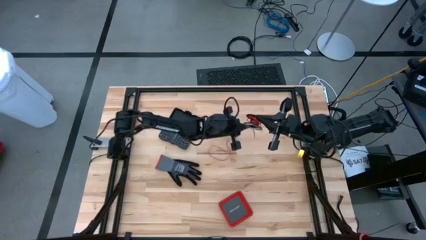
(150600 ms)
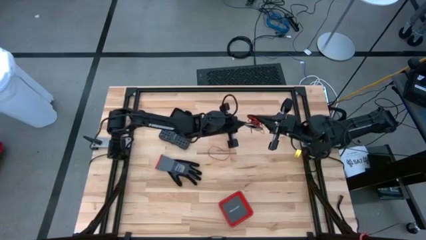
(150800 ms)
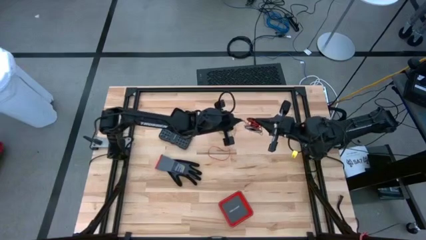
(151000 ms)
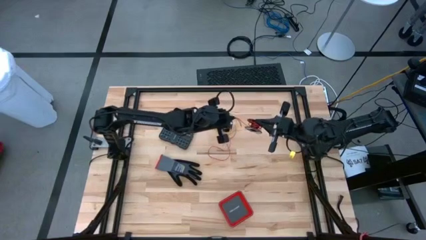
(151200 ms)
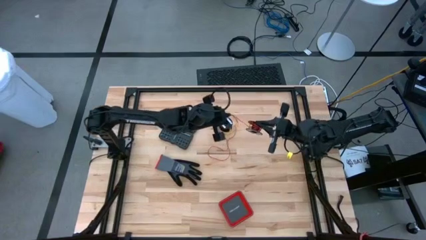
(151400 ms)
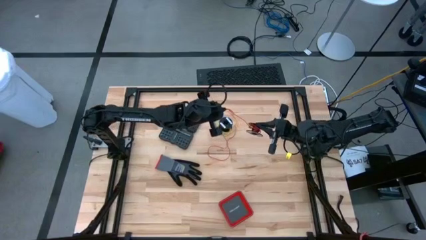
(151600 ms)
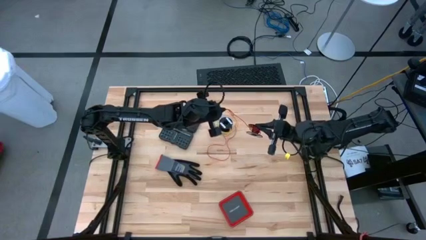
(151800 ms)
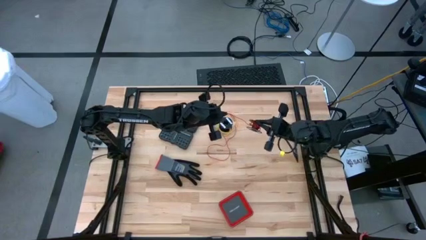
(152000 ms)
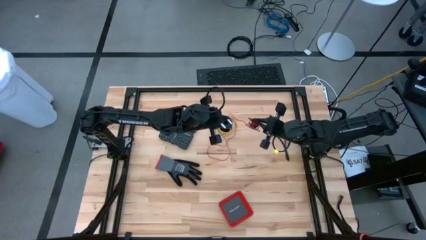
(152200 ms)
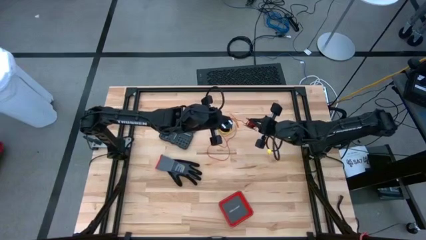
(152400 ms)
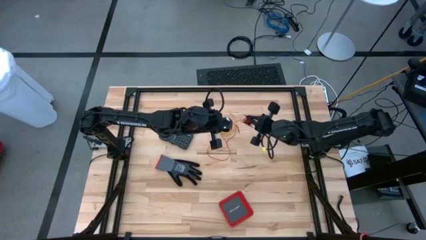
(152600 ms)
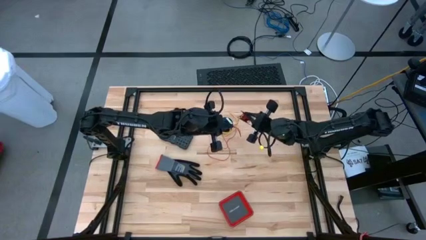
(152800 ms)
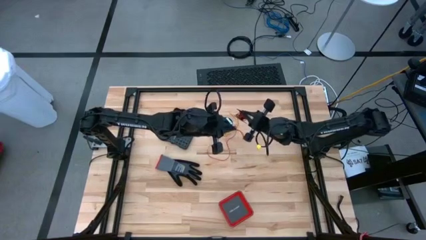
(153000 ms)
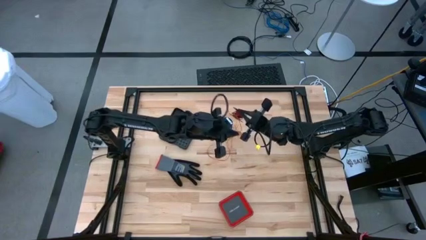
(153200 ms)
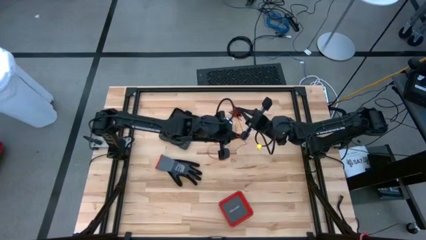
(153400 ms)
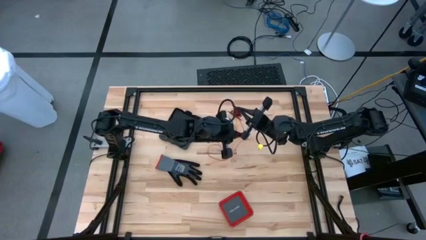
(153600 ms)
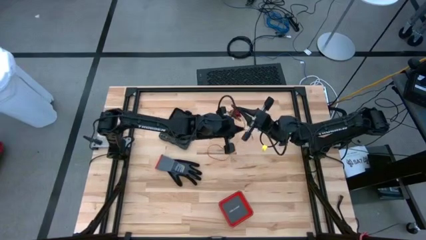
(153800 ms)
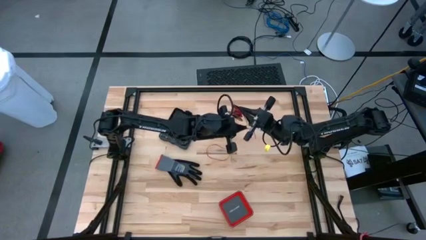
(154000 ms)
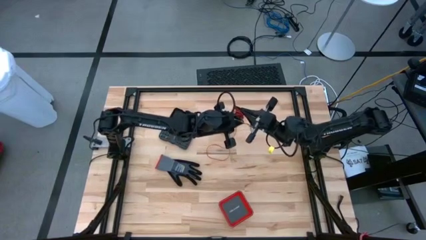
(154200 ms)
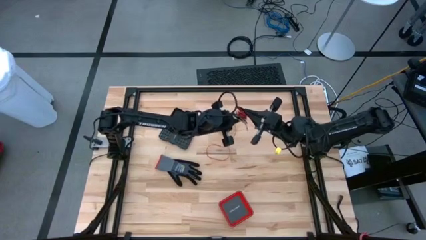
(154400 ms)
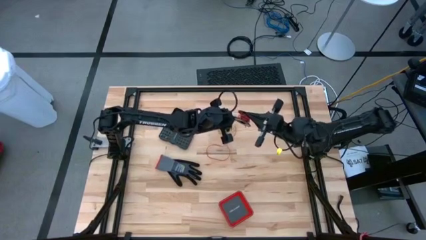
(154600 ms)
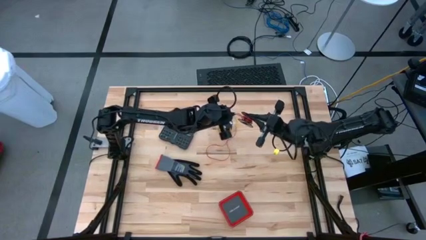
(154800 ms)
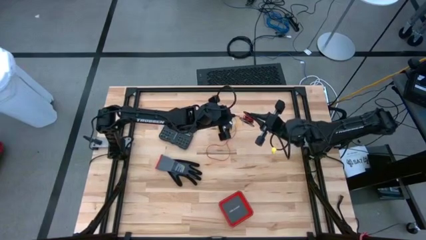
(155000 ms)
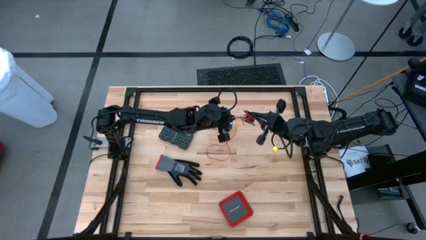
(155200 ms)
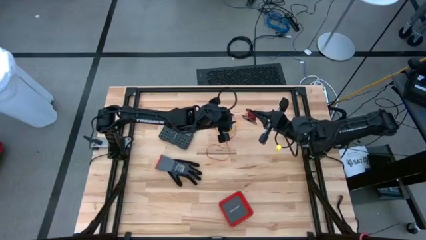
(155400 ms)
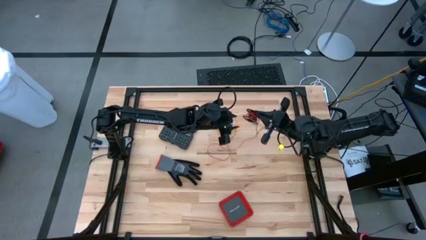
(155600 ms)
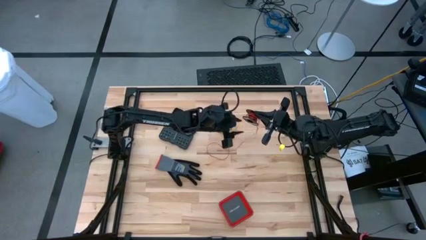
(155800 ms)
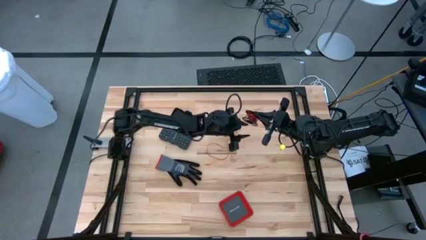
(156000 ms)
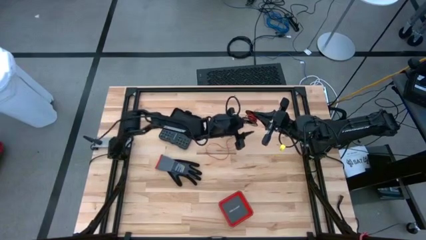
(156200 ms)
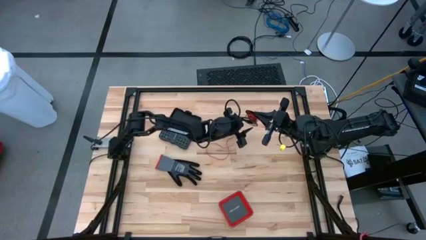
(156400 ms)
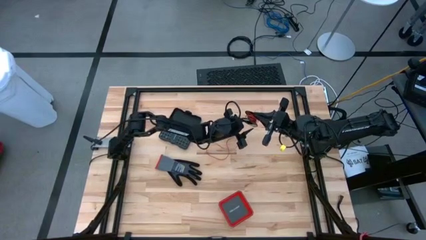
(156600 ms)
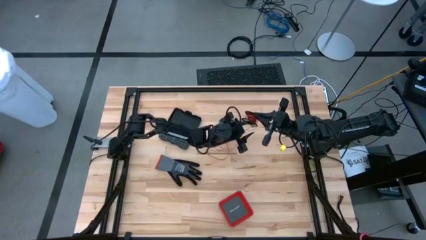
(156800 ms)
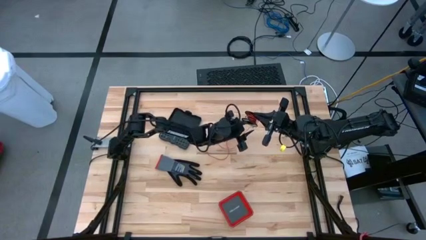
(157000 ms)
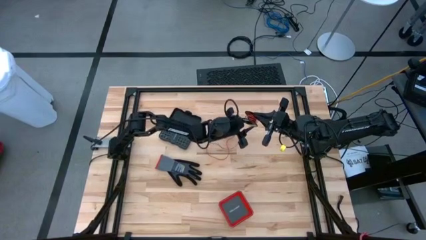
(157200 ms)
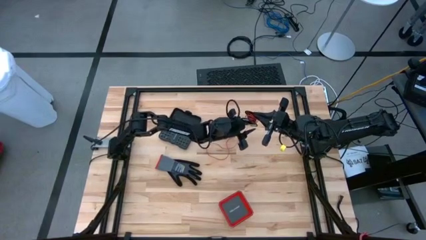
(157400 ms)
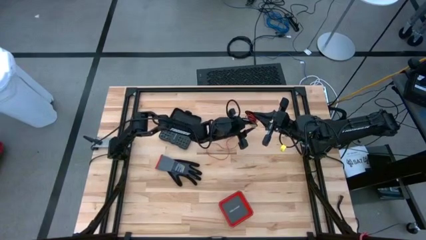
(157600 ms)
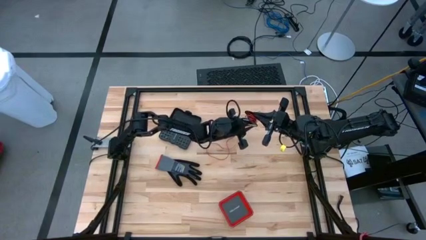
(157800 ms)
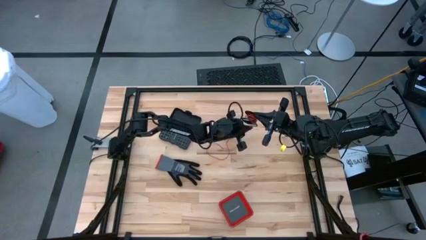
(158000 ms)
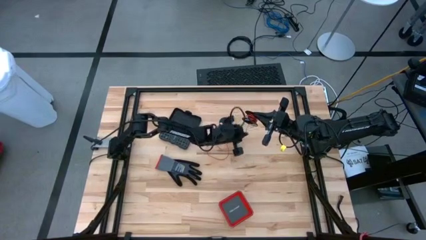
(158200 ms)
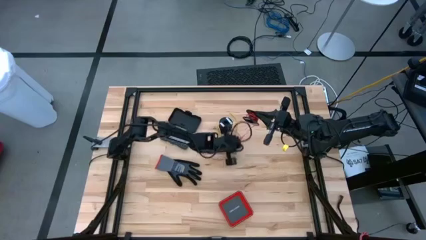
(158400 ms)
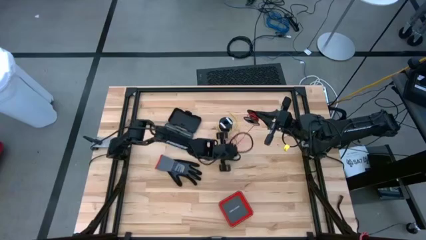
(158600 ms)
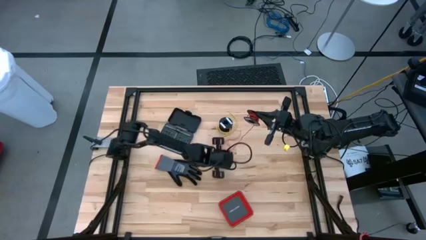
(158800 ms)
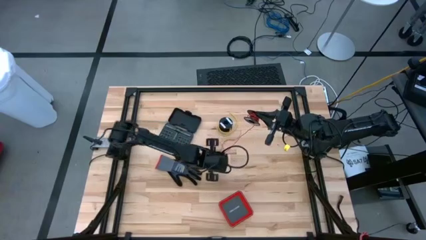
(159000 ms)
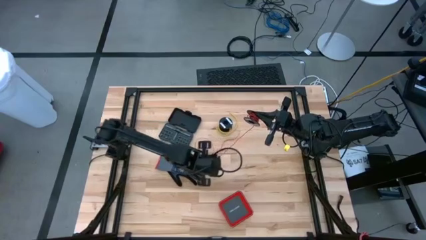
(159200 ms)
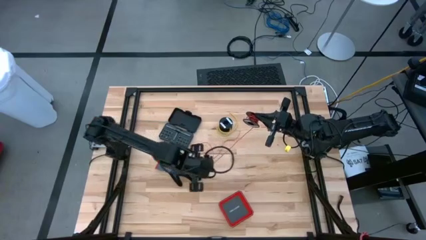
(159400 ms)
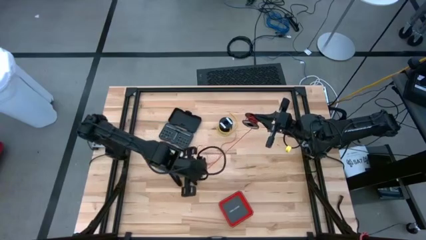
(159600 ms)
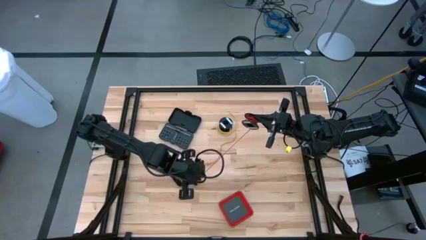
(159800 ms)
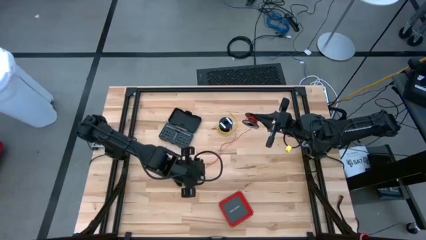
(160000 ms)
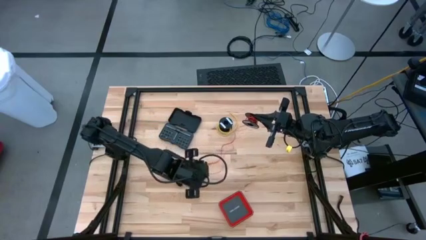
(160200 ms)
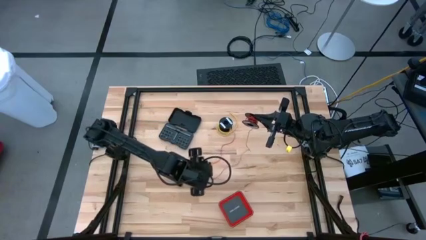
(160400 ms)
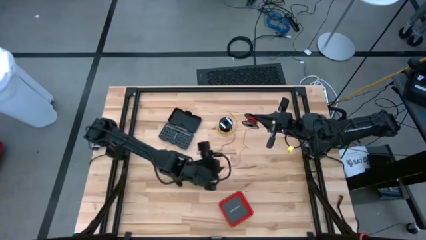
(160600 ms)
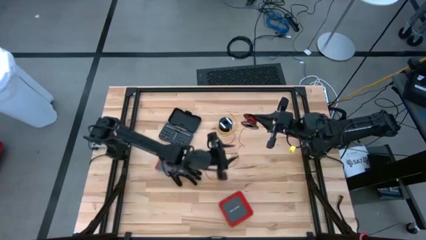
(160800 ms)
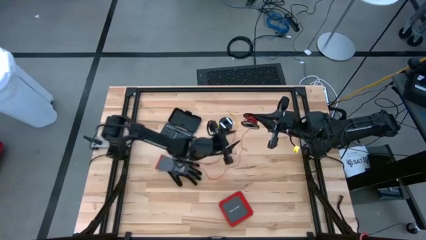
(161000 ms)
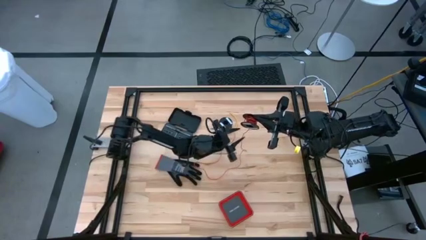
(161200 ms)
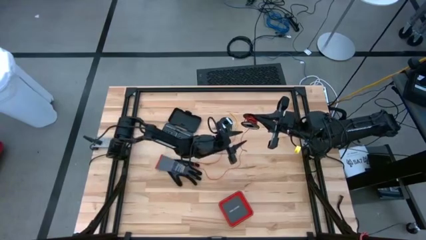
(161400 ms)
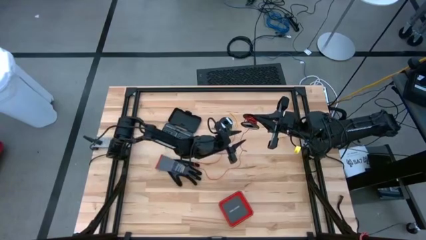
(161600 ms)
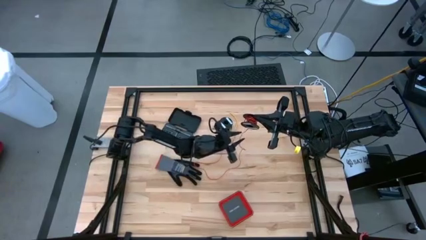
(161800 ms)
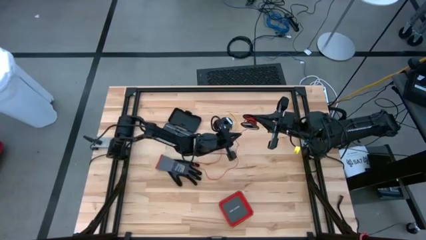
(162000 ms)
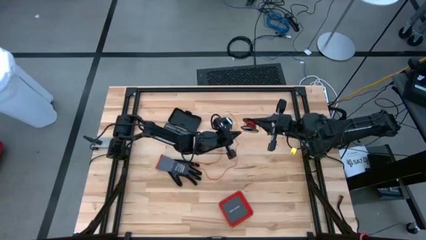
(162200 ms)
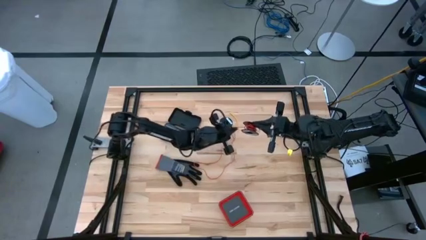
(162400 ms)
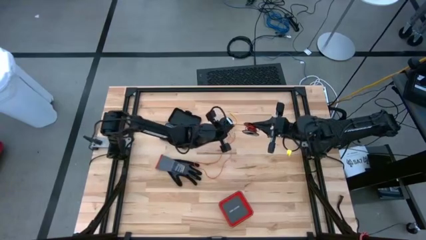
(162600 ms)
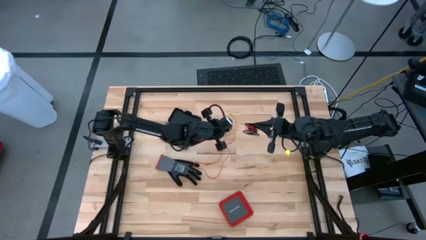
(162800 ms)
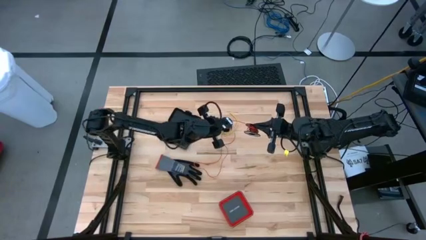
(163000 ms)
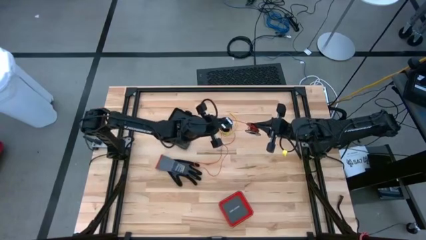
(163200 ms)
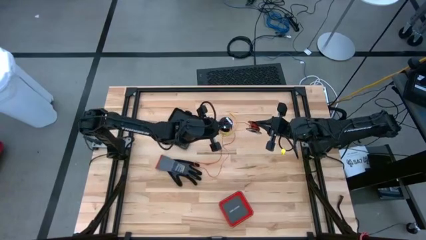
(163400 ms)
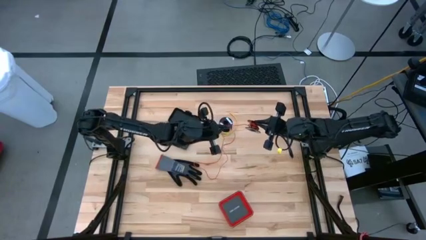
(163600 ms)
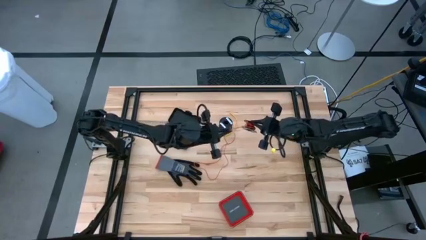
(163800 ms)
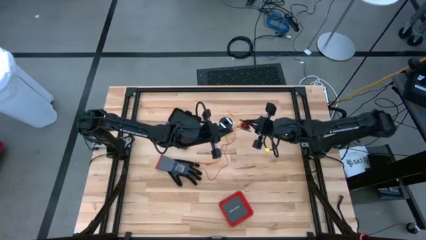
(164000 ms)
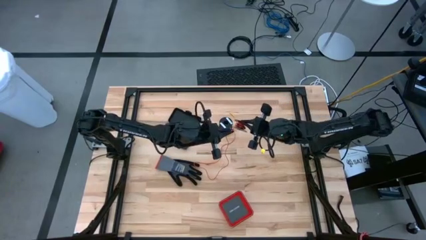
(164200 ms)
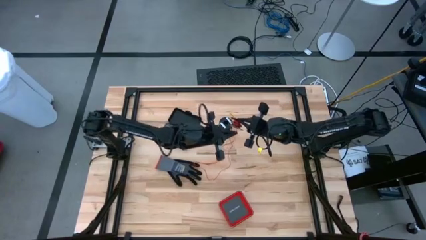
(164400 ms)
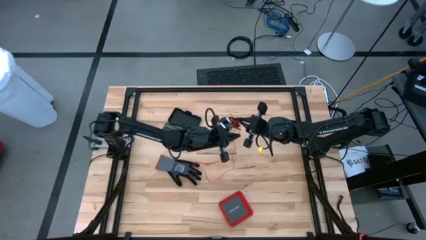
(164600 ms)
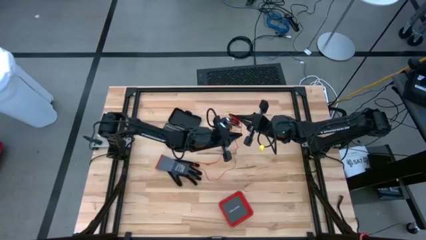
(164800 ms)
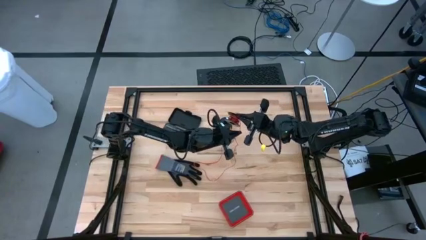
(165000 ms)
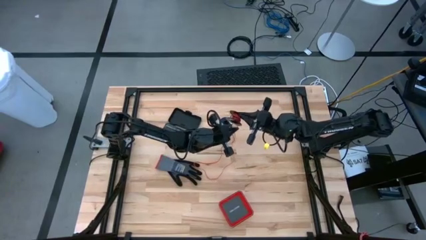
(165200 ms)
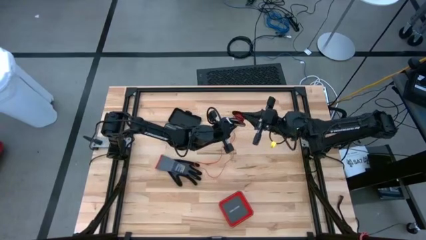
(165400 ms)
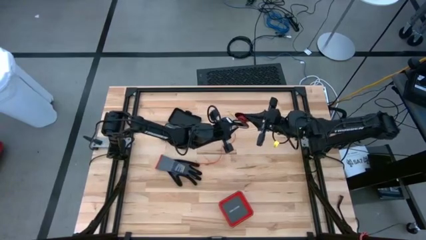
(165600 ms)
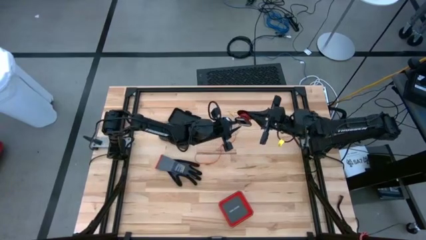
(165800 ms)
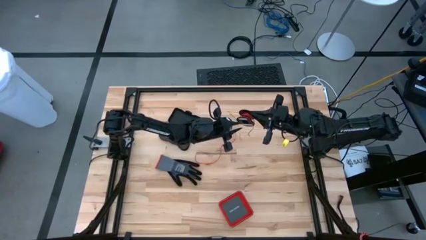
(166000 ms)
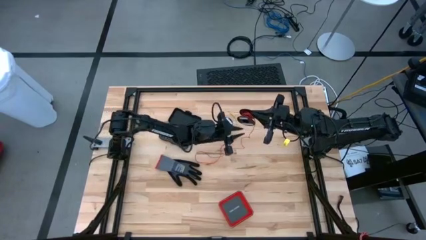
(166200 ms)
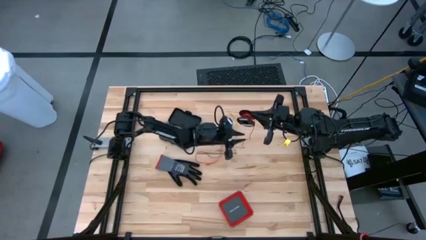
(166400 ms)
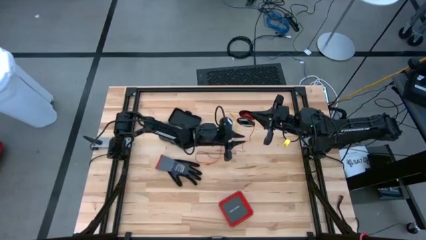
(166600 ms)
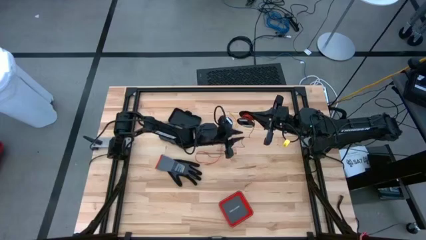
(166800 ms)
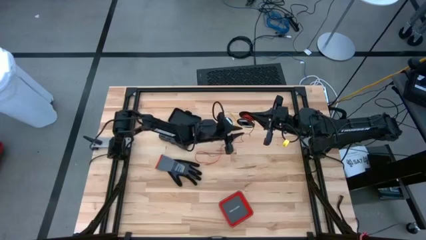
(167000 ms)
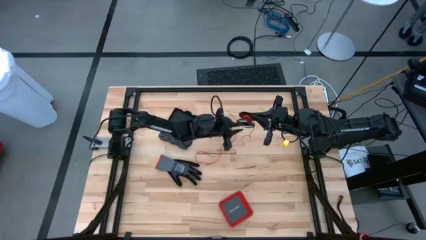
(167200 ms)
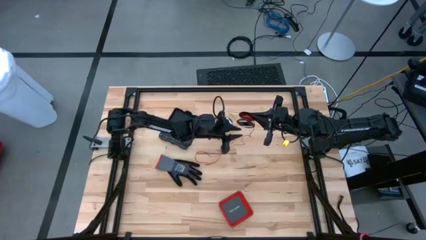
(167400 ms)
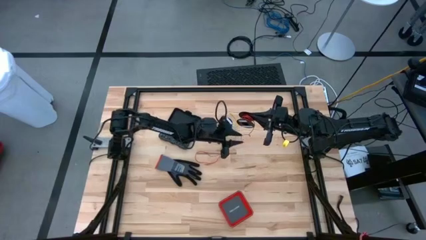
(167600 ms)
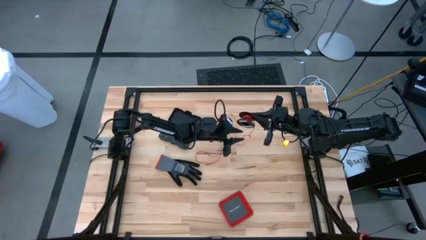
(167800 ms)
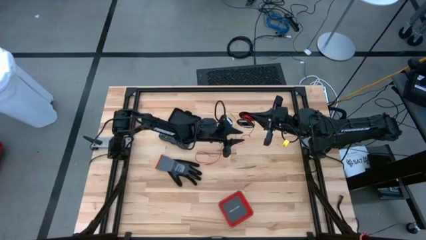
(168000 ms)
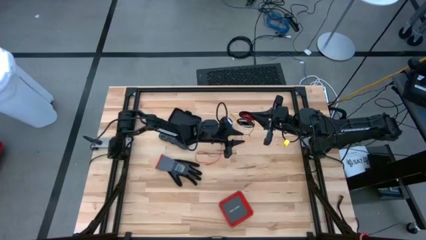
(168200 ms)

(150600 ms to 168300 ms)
Task: Coil cords
Coil the red wire onto the spool
